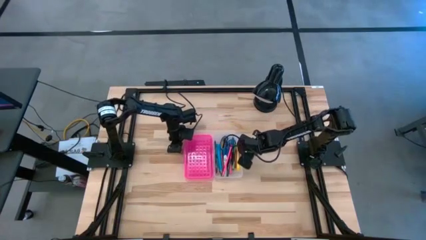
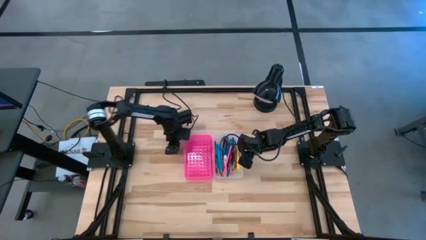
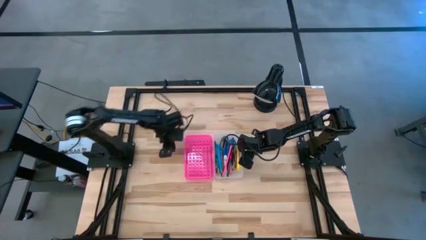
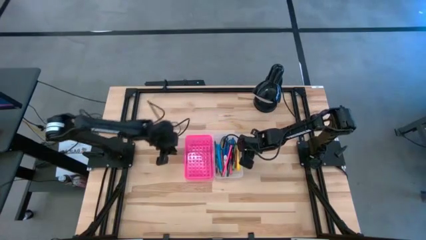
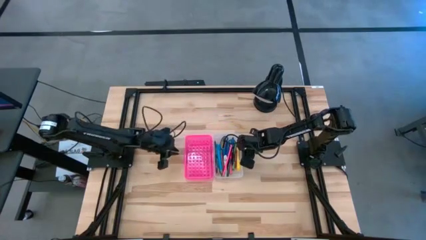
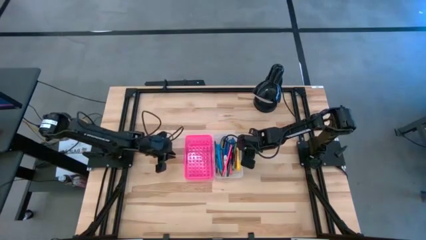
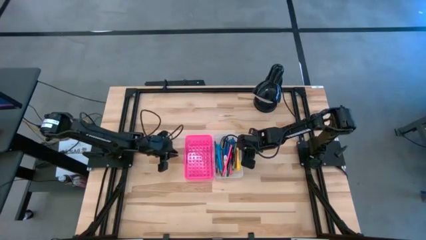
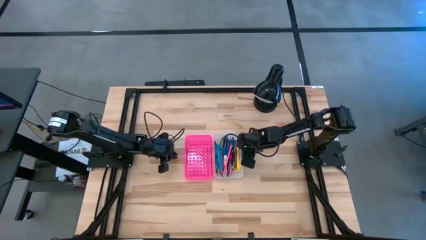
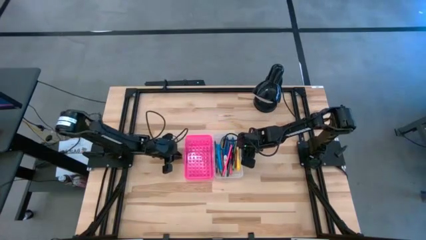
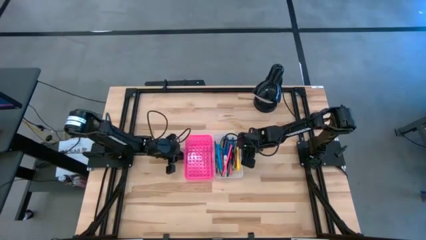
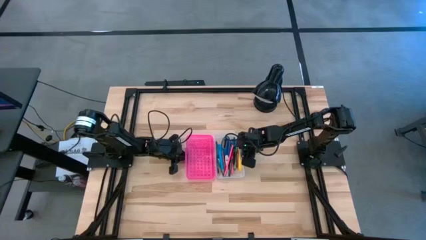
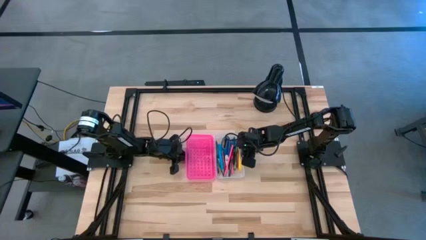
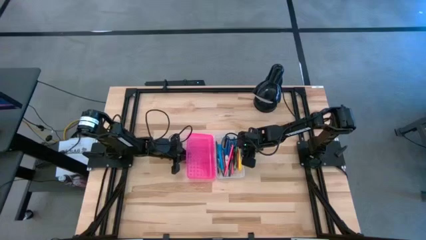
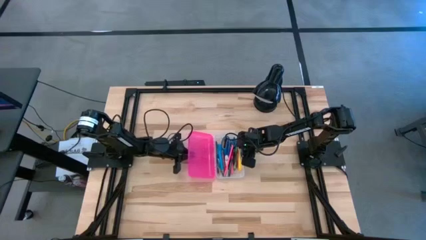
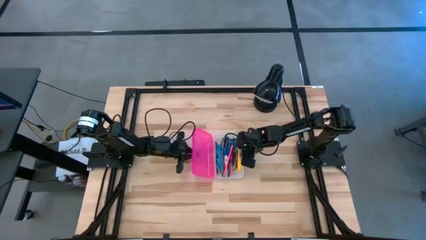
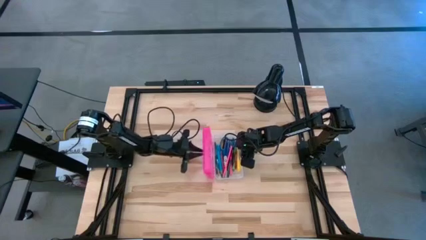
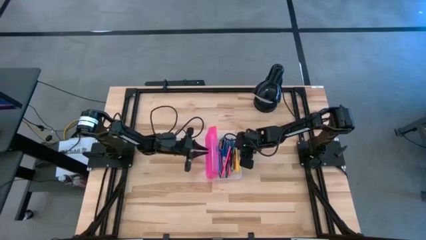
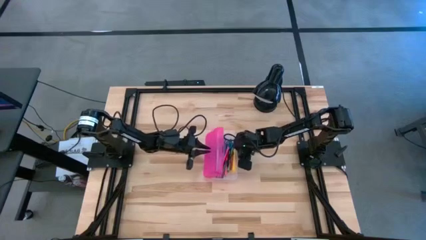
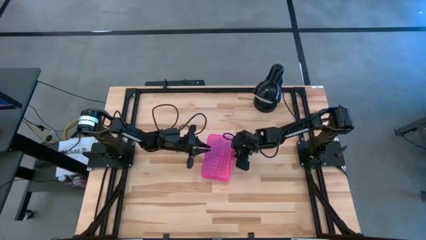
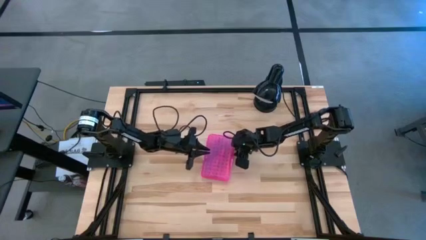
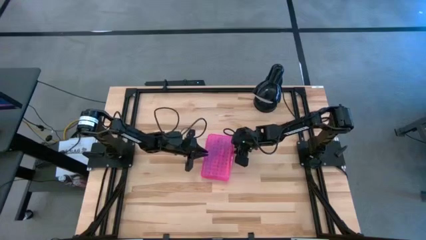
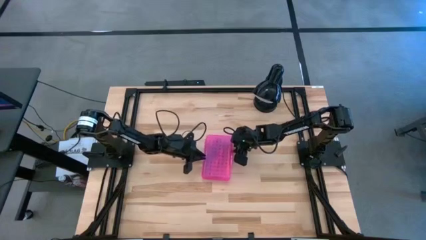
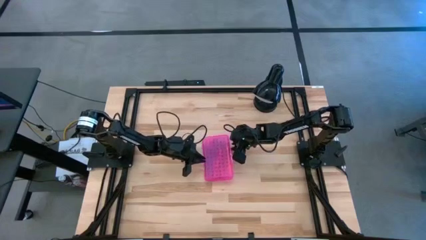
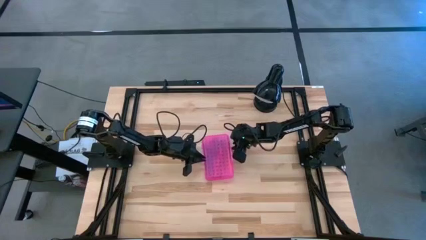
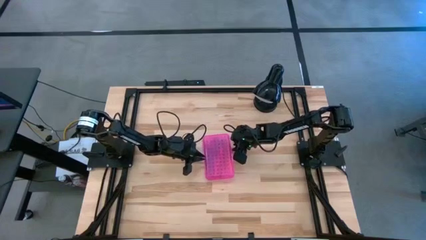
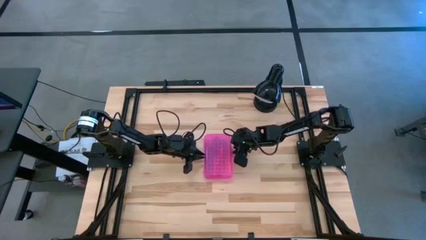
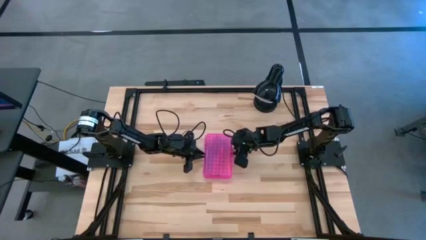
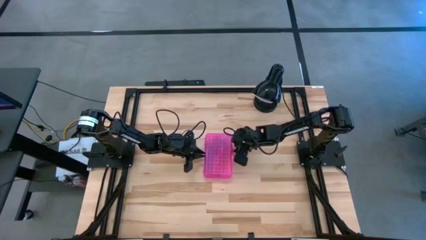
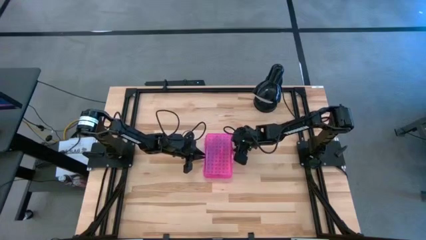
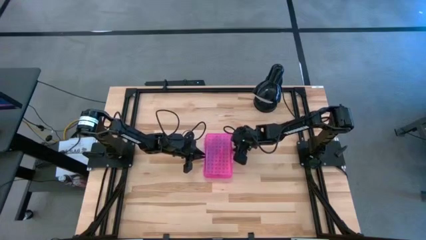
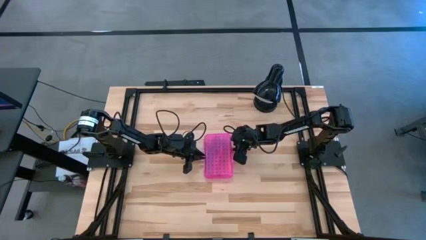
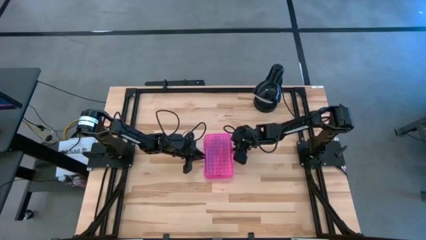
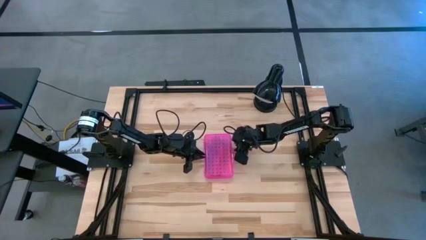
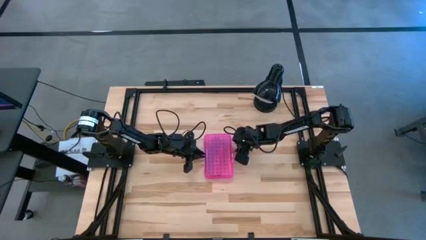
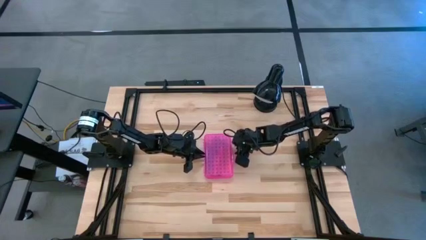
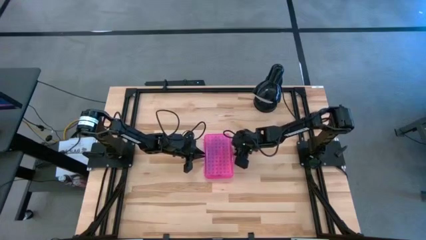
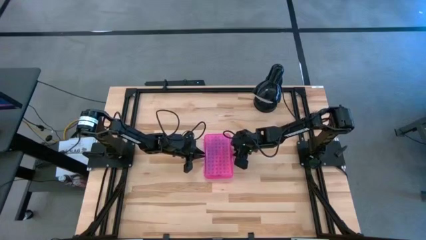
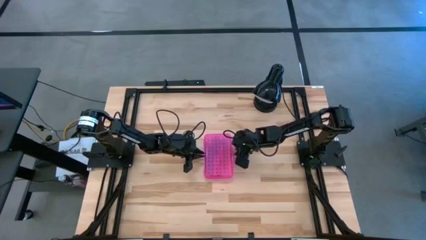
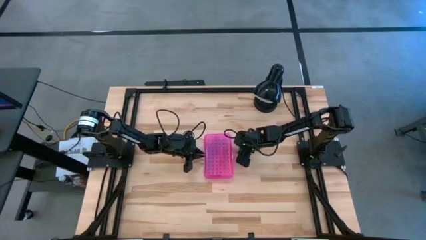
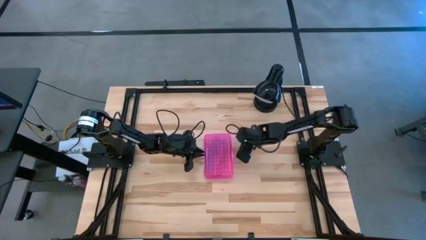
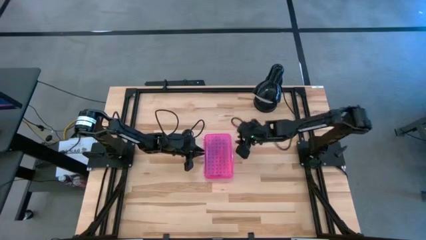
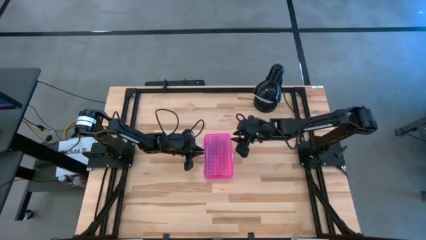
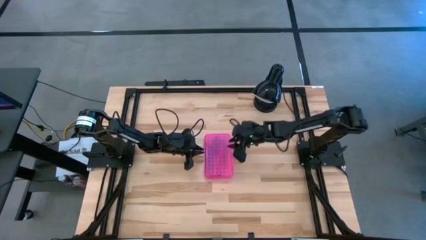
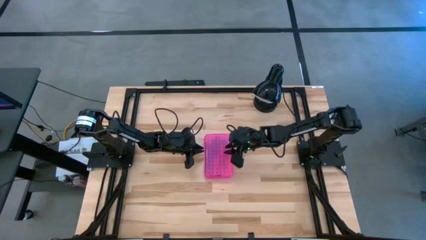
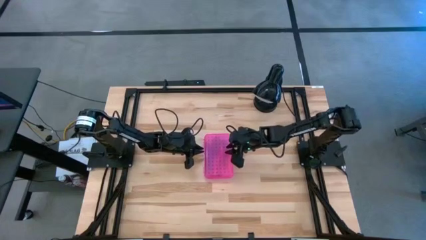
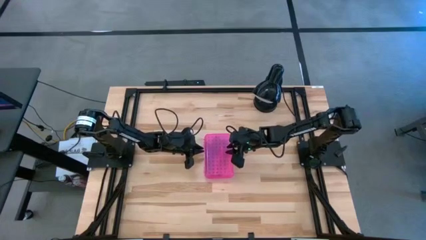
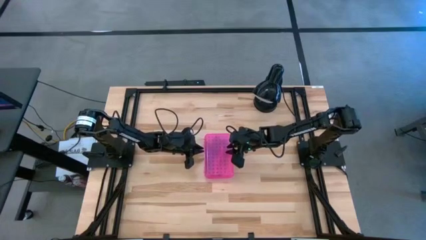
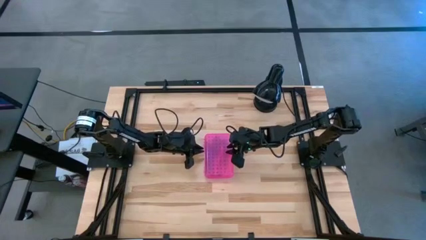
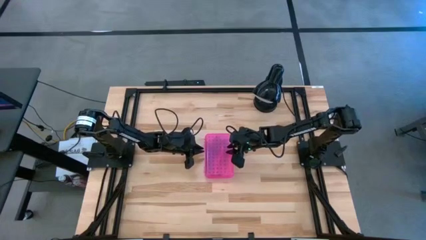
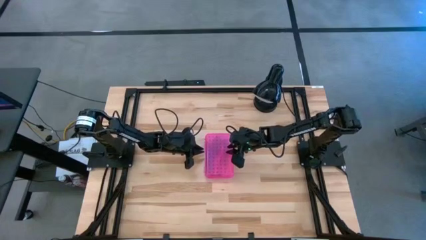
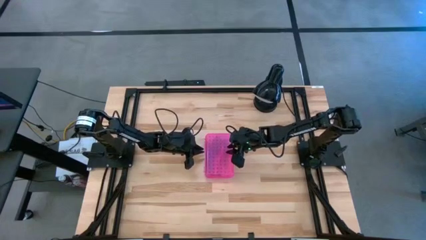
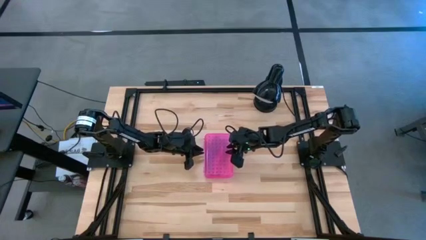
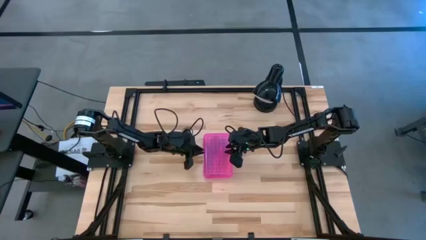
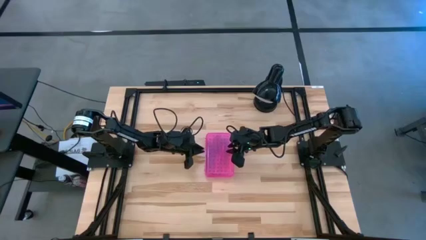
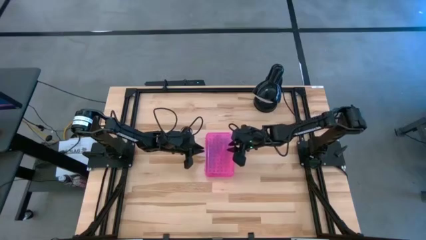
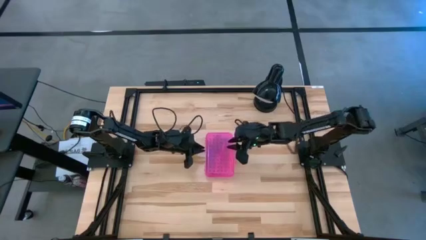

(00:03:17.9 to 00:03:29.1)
Task: Pick & place school supplies into a supply box
Close the lid of the pink supply box

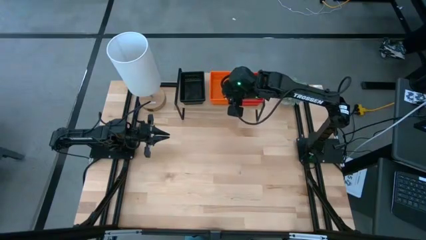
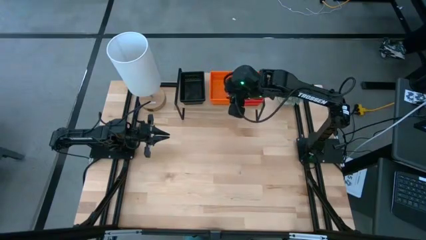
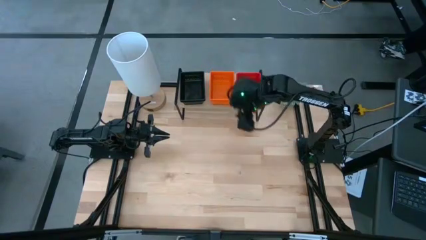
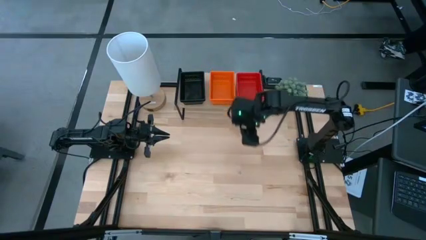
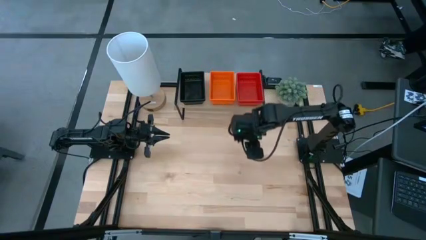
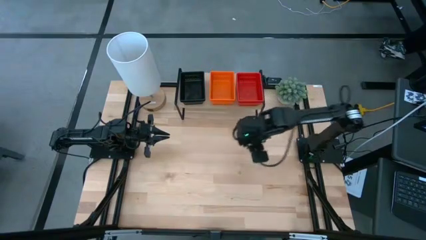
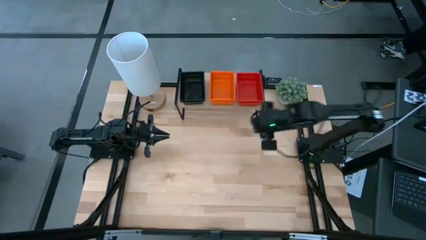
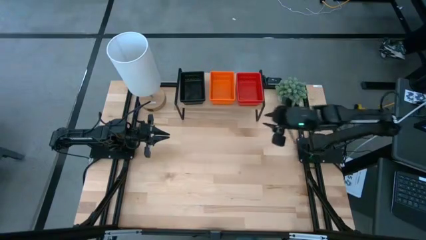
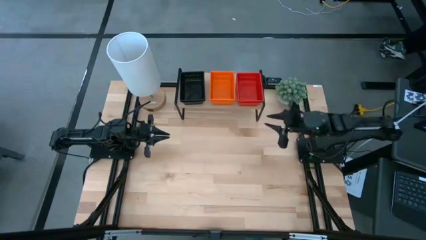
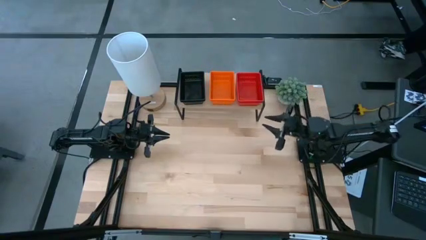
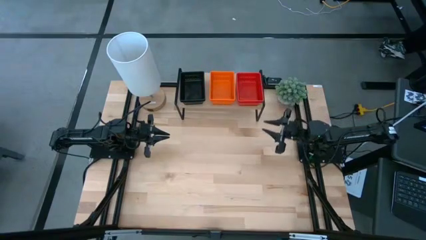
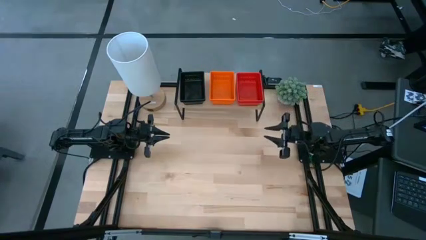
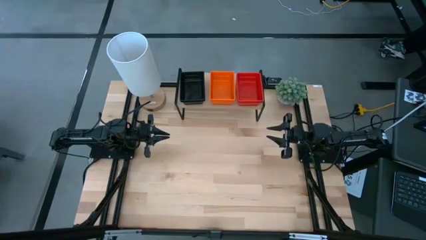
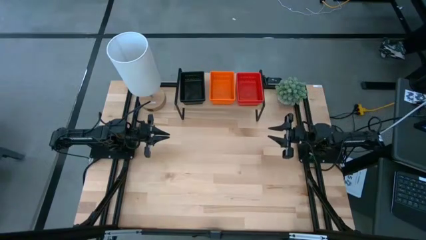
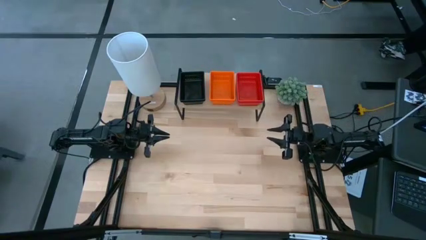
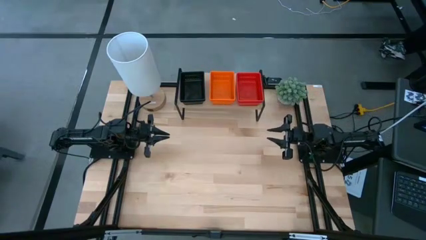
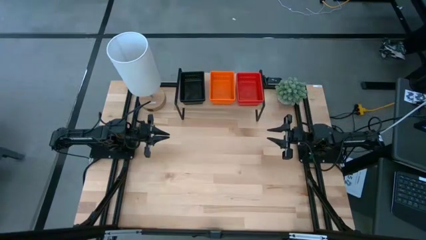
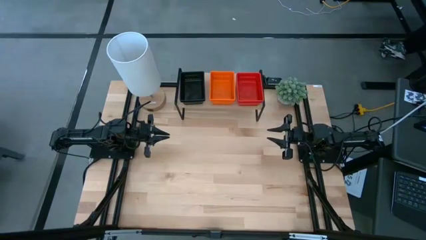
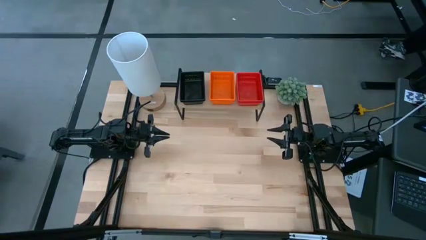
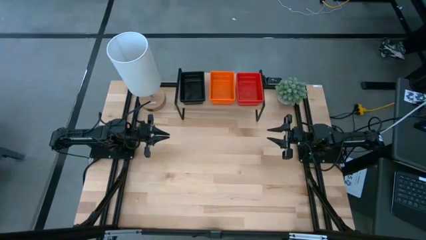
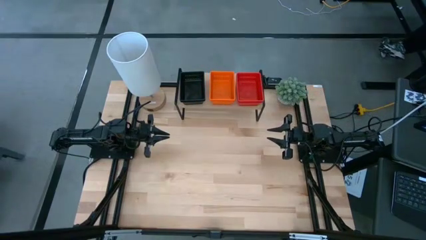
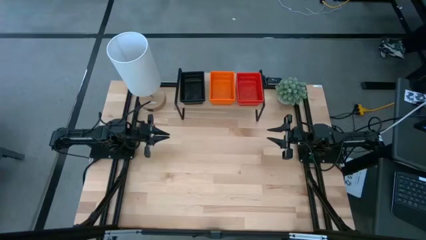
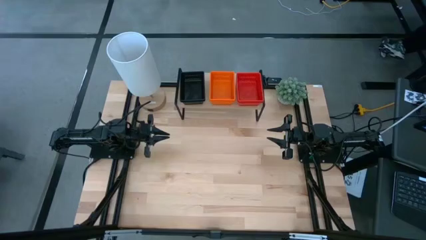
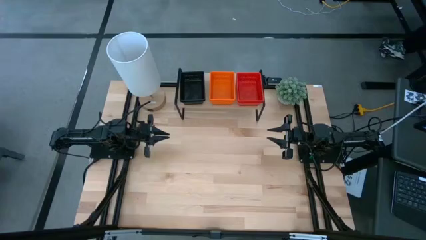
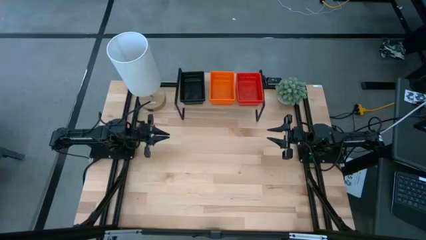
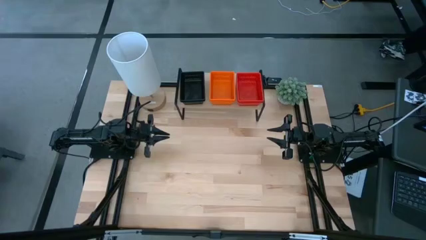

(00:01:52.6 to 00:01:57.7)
Task: Stack baskets on shelf by color
Return to Home Position
